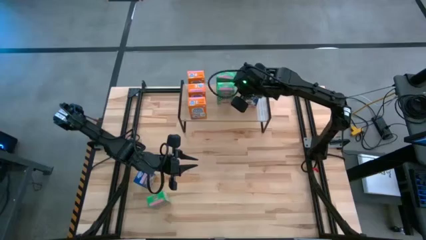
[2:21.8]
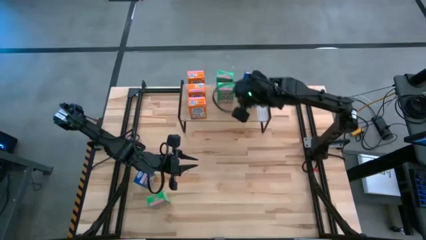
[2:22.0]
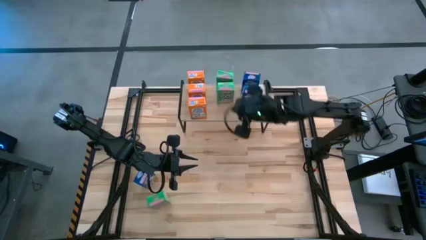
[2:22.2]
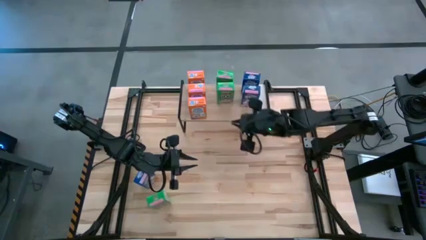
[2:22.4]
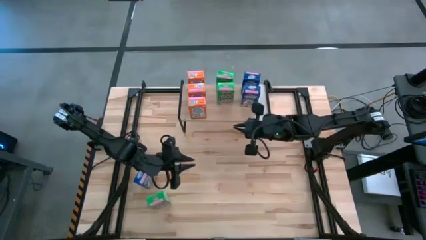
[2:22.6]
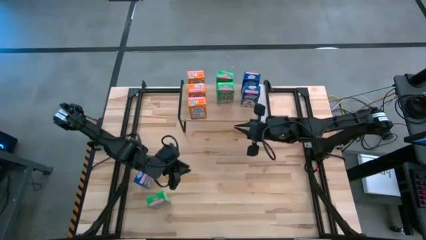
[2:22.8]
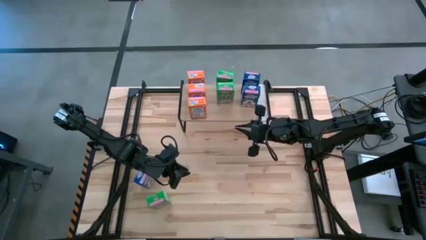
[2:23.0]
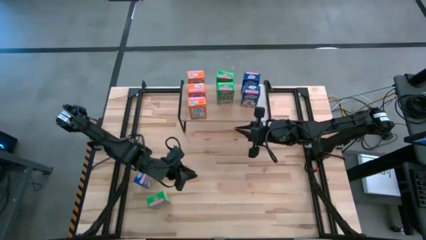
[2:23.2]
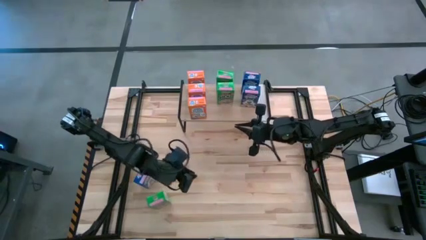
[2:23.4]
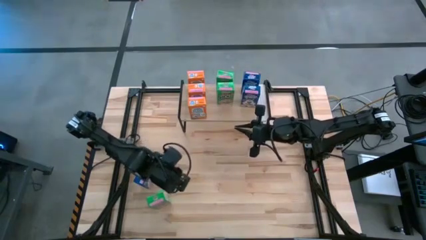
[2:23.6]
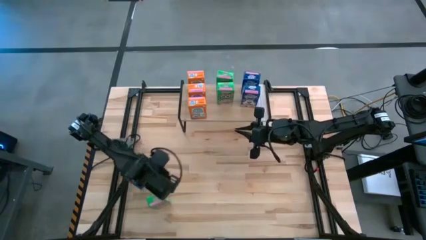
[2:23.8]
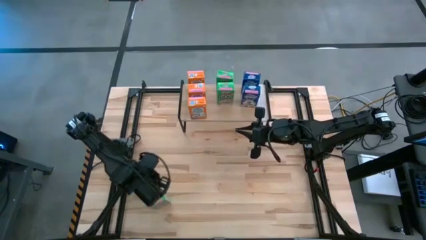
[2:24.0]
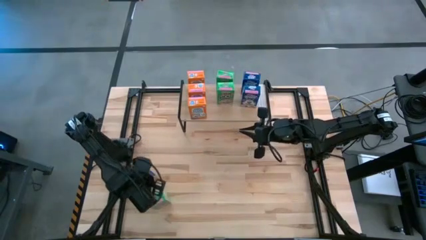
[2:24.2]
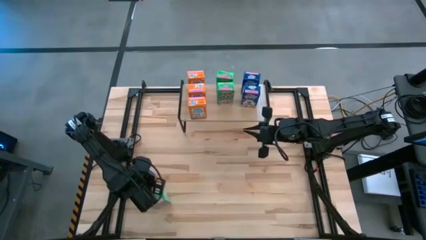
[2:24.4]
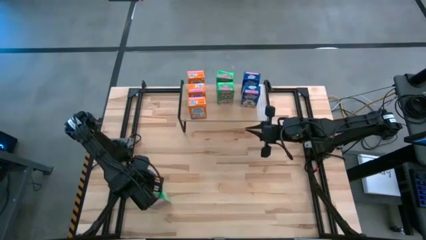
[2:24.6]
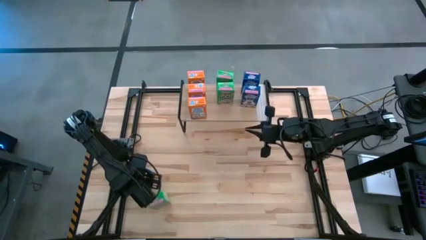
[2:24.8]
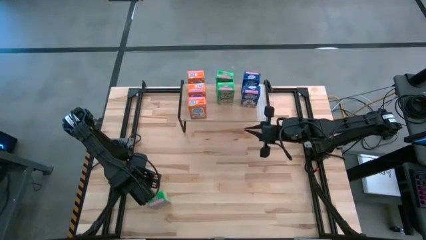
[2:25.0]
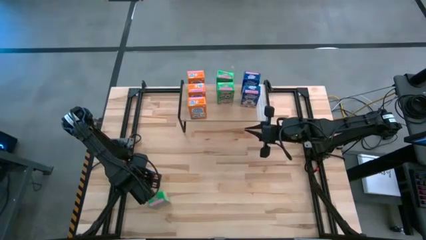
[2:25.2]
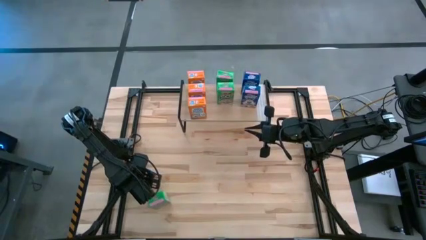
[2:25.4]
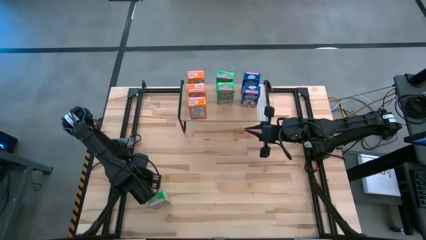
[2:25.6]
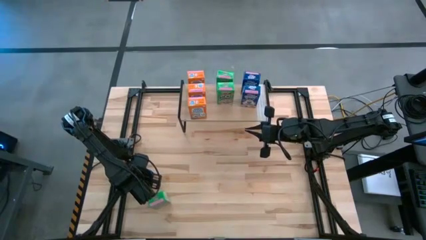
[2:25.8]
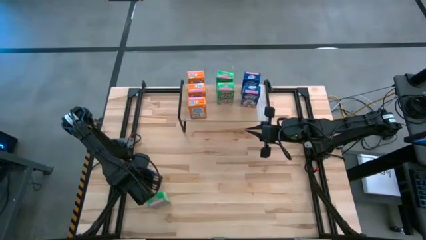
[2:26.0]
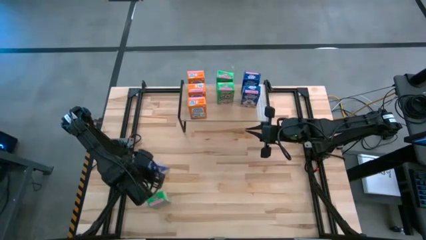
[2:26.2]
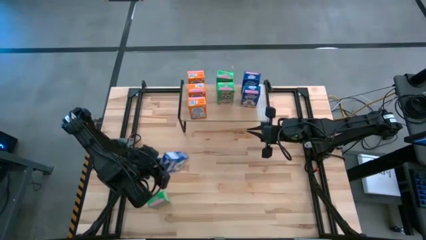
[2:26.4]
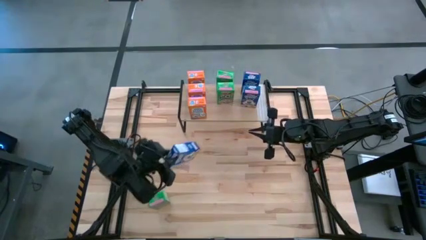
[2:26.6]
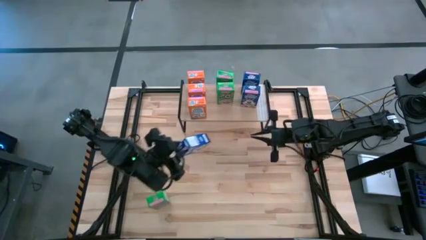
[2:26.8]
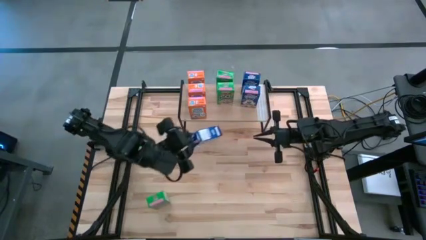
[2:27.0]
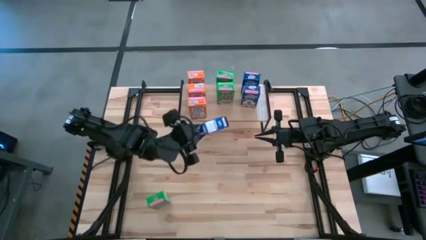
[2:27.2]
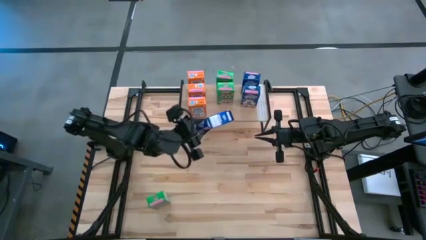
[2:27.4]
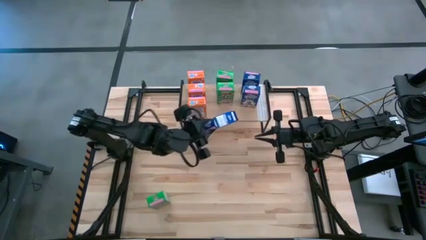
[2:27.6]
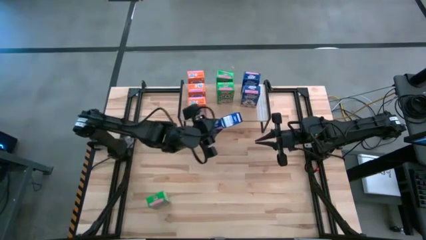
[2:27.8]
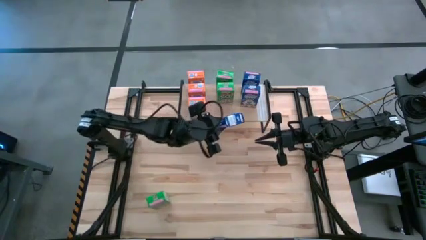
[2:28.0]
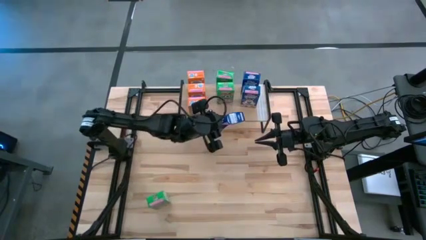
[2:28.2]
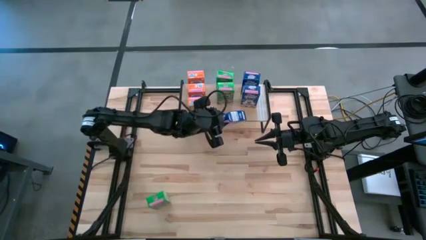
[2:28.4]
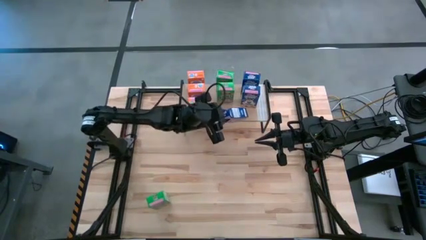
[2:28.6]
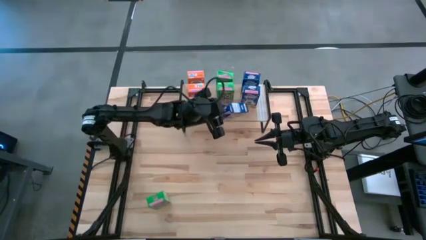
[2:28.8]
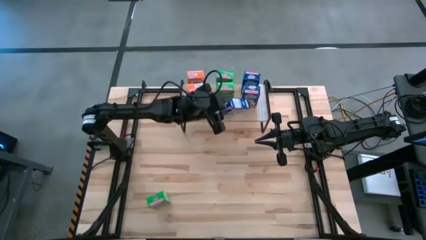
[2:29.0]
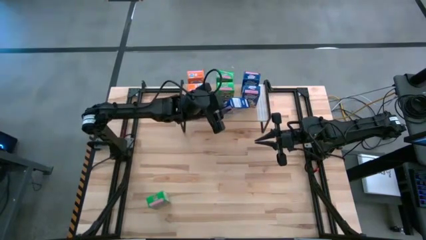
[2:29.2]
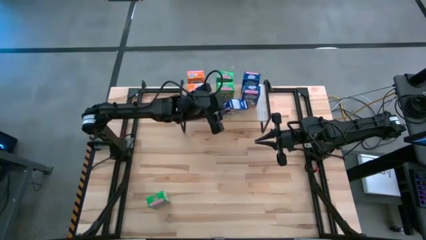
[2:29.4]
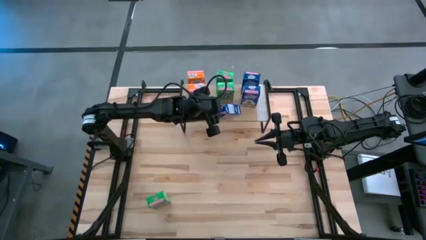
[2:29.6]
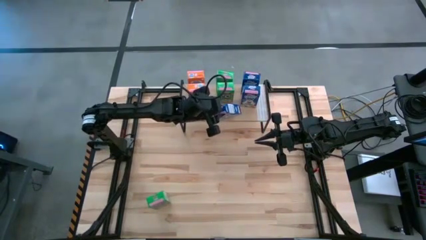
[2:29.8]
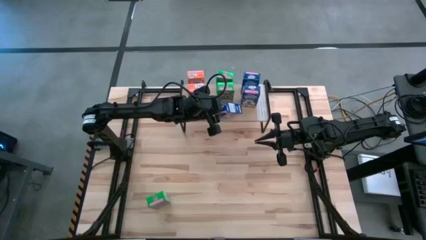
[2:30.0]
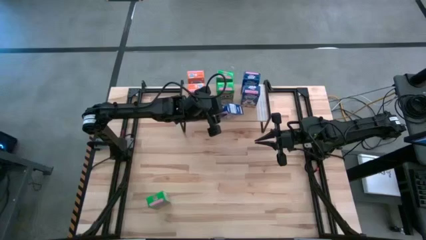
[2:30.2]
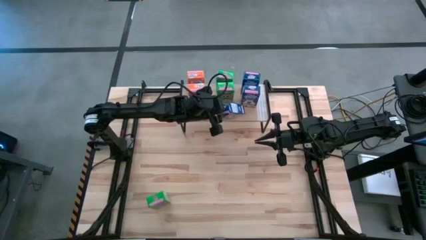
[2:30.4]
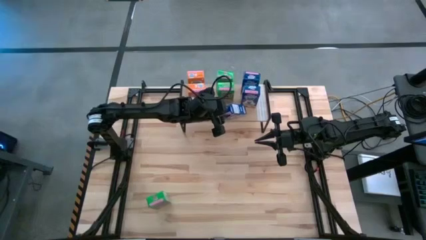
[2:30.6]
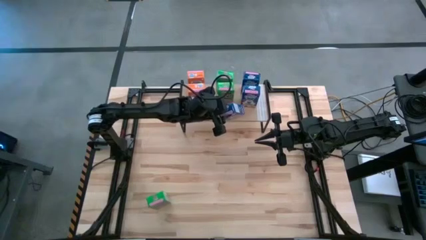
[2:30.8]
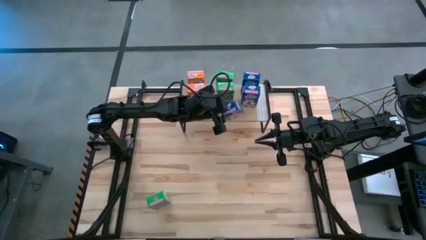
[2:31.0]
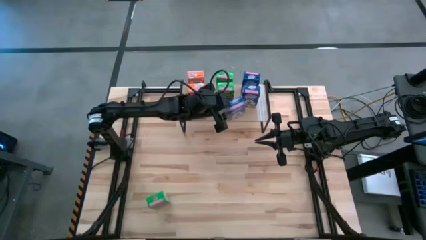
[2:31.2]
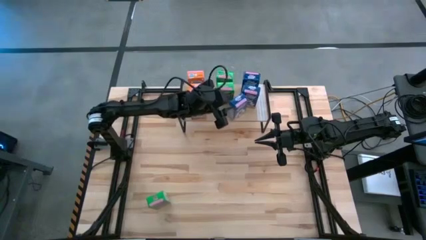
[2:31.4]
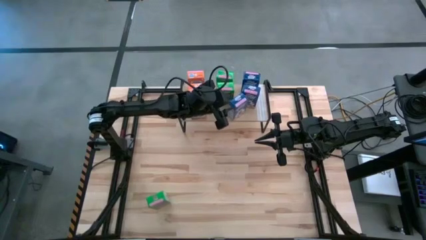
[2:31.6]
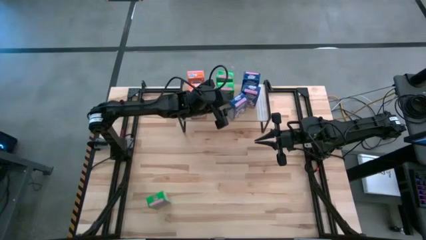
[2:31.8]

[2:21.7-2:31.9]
Task: Stack cereal on shelf
Put the blue cereal box aligned with the other blue cereal box on the shelf
